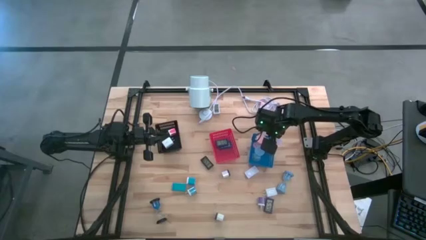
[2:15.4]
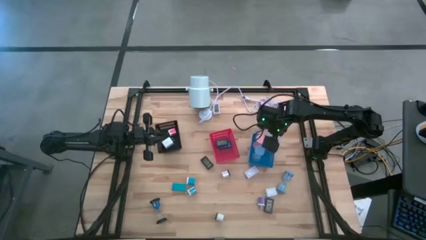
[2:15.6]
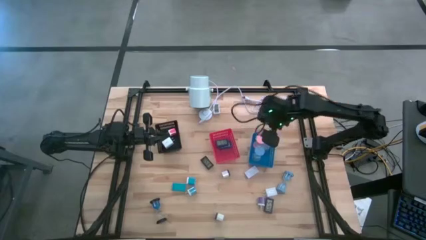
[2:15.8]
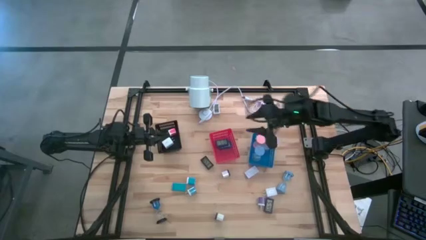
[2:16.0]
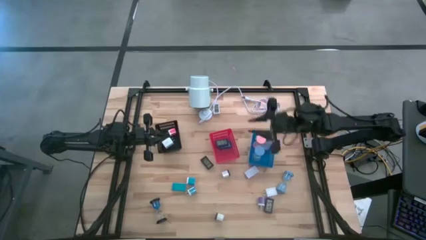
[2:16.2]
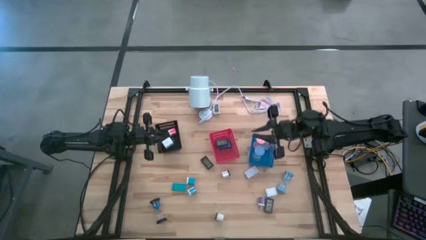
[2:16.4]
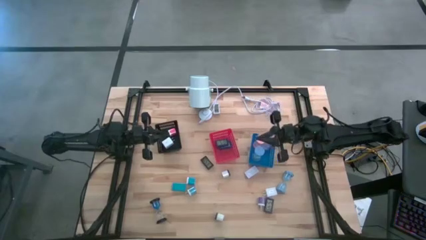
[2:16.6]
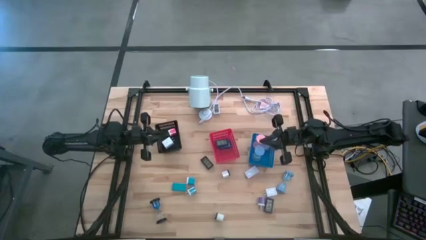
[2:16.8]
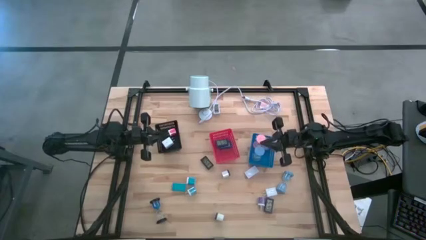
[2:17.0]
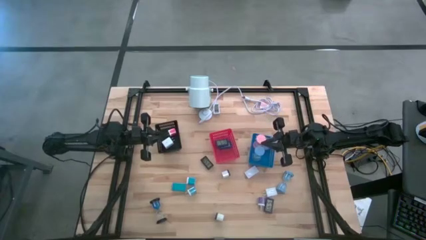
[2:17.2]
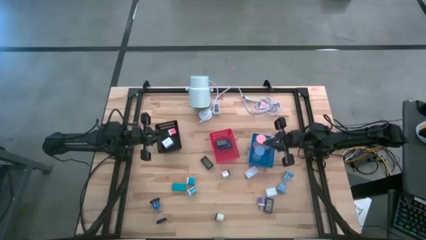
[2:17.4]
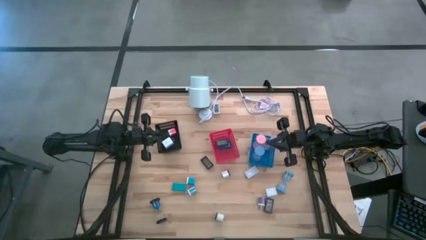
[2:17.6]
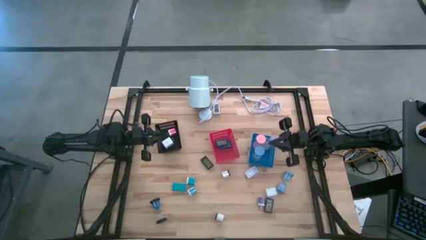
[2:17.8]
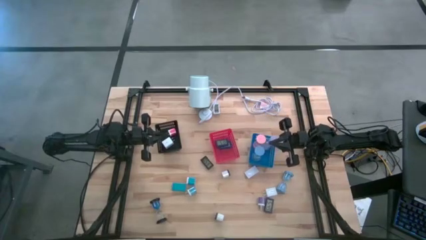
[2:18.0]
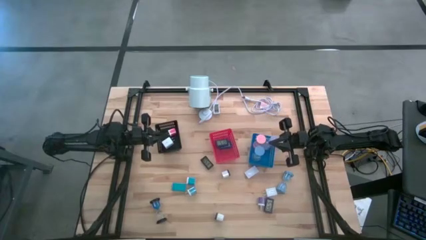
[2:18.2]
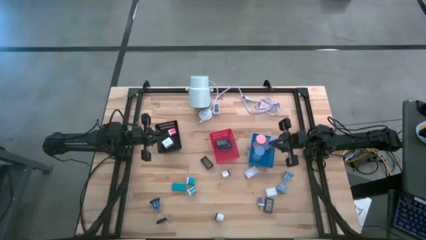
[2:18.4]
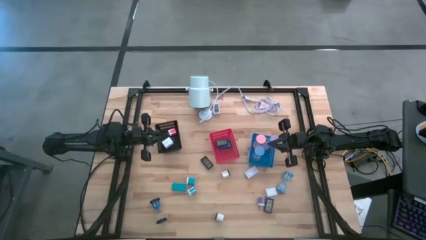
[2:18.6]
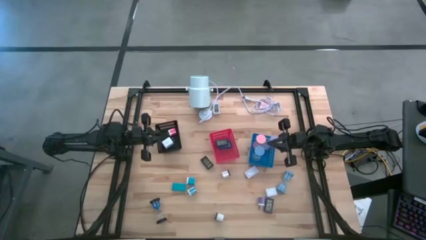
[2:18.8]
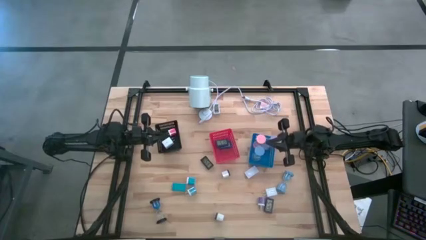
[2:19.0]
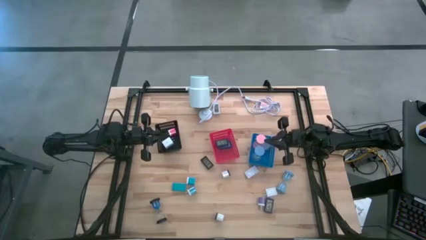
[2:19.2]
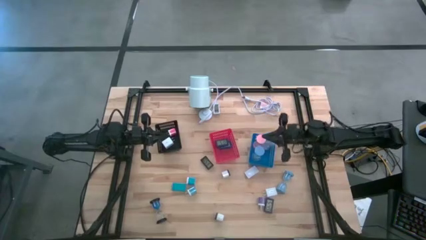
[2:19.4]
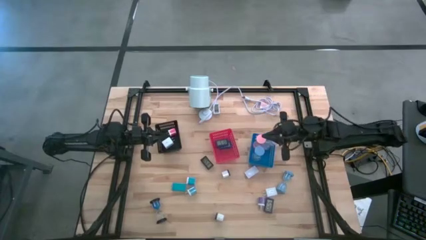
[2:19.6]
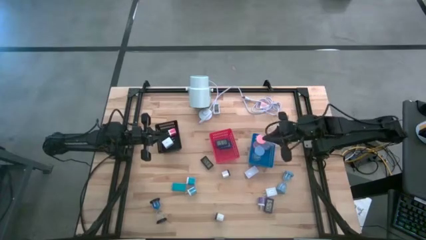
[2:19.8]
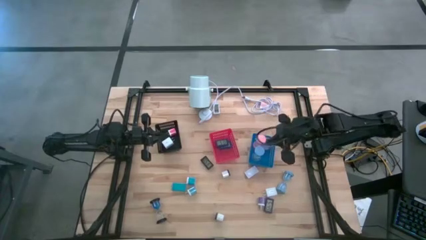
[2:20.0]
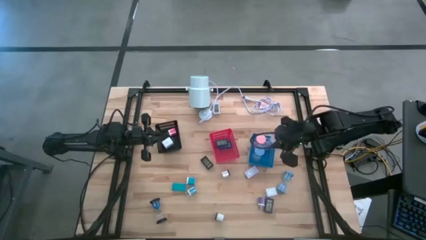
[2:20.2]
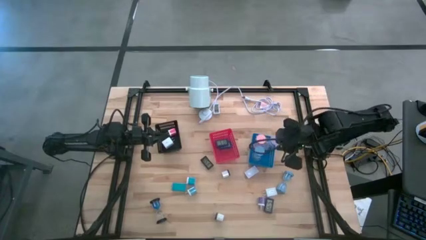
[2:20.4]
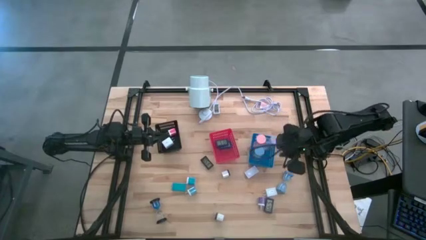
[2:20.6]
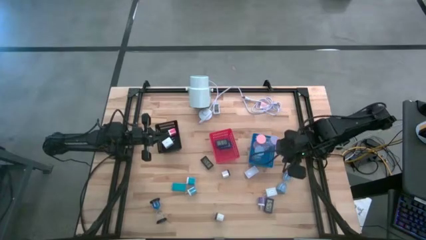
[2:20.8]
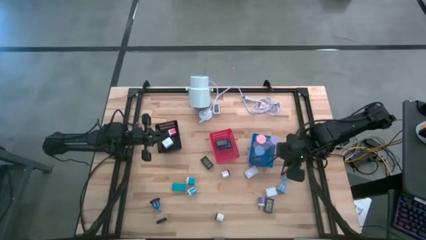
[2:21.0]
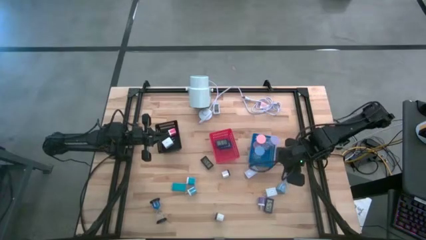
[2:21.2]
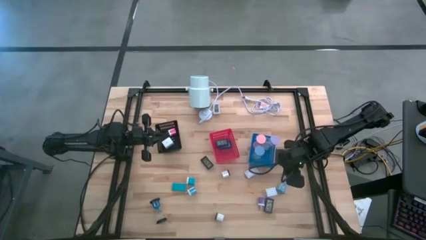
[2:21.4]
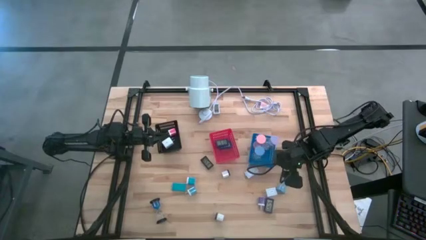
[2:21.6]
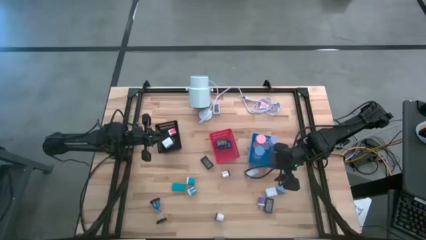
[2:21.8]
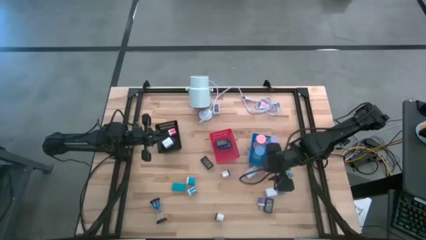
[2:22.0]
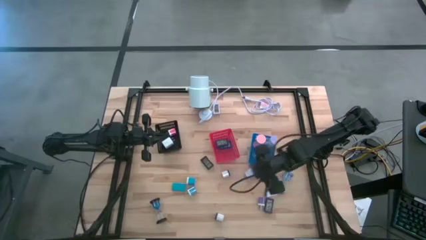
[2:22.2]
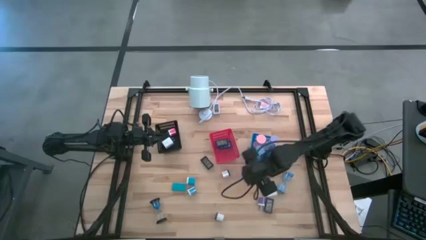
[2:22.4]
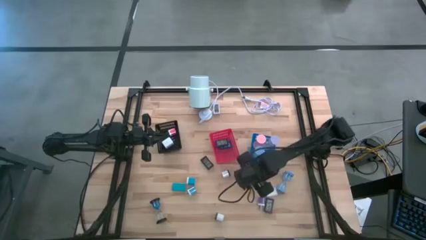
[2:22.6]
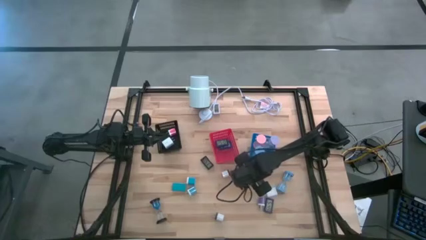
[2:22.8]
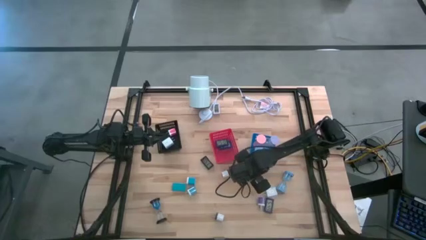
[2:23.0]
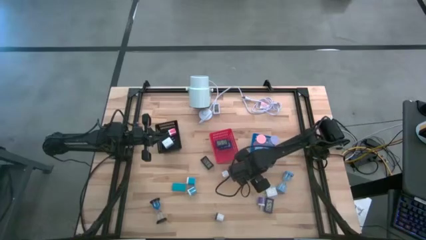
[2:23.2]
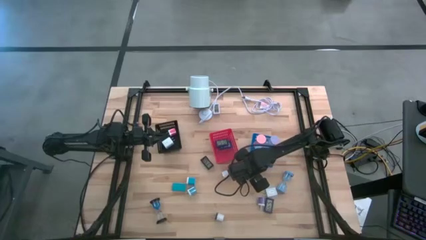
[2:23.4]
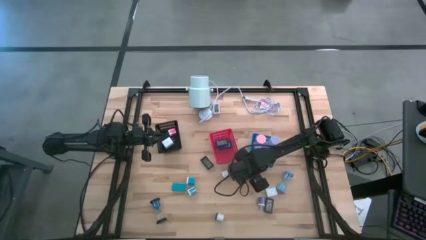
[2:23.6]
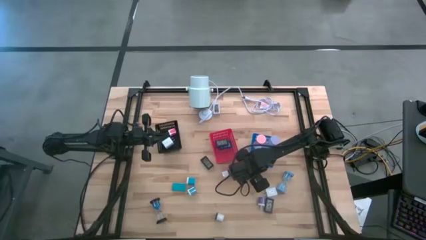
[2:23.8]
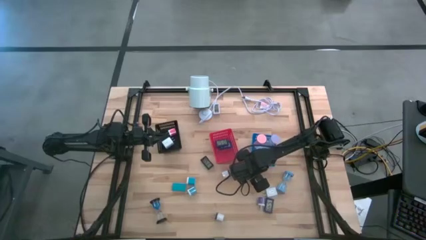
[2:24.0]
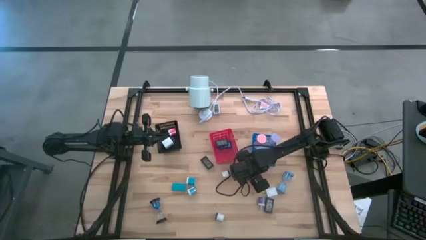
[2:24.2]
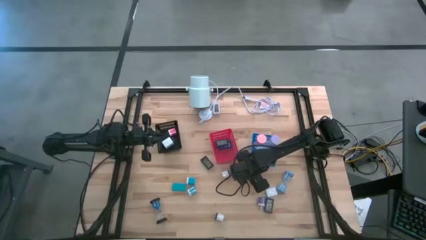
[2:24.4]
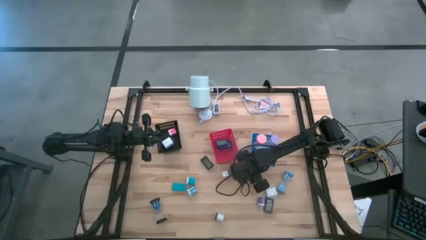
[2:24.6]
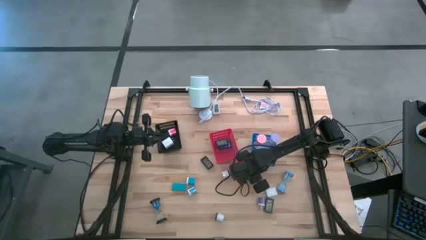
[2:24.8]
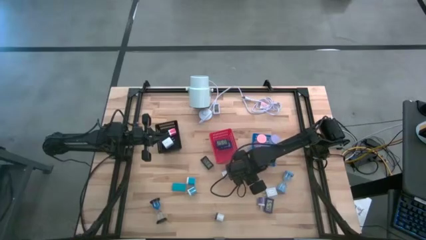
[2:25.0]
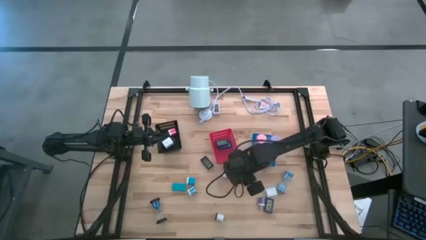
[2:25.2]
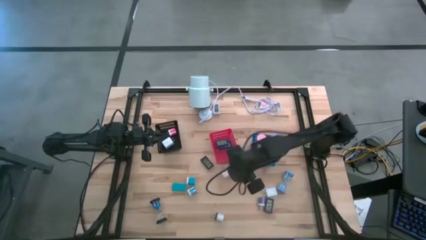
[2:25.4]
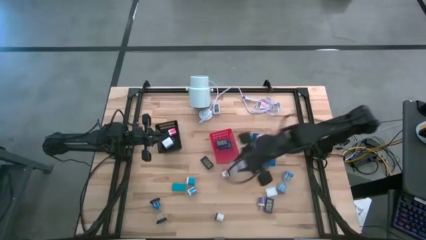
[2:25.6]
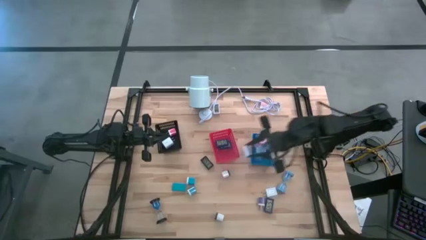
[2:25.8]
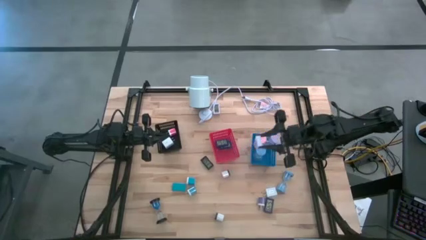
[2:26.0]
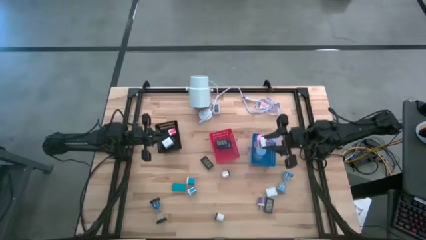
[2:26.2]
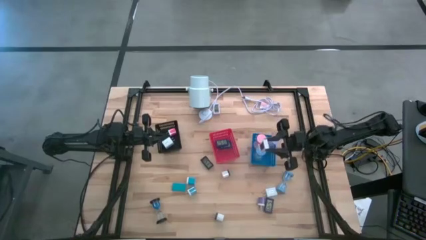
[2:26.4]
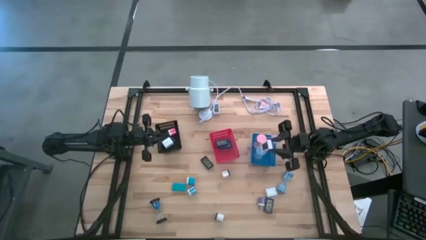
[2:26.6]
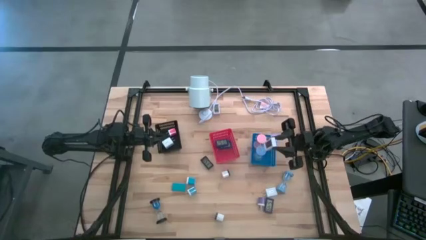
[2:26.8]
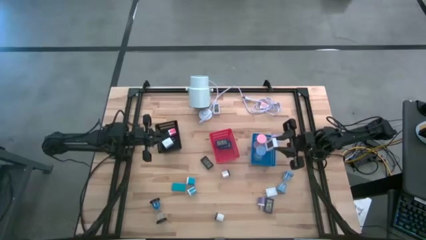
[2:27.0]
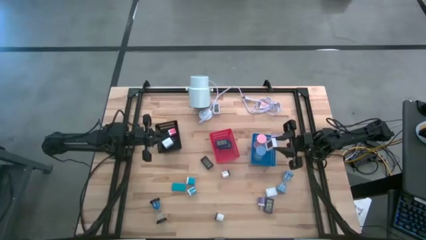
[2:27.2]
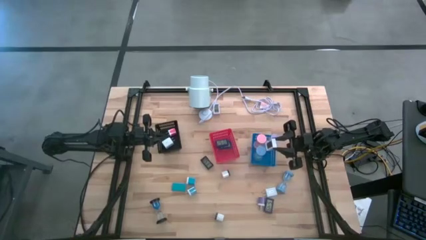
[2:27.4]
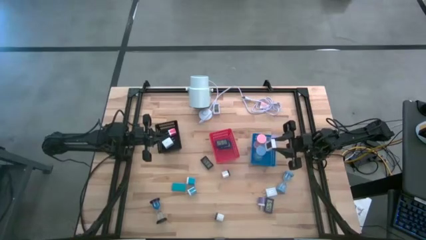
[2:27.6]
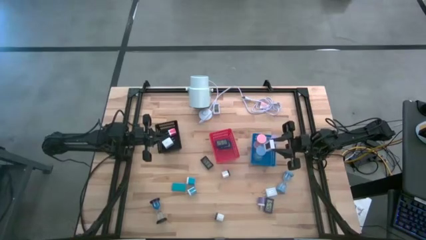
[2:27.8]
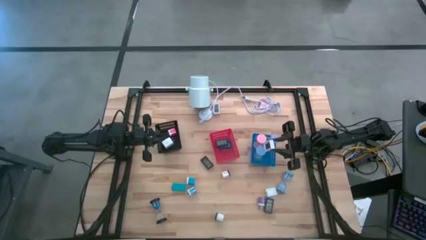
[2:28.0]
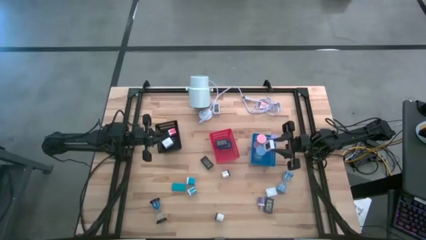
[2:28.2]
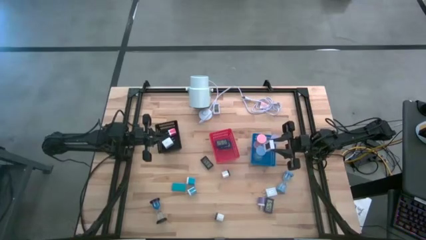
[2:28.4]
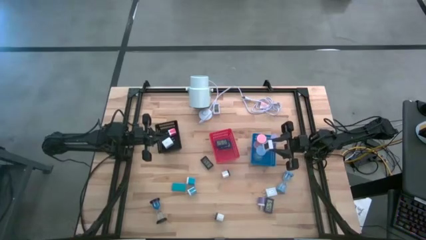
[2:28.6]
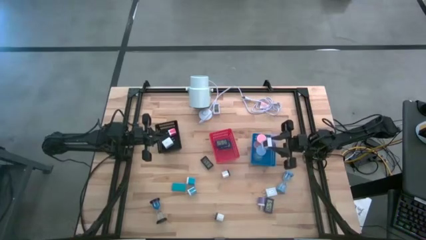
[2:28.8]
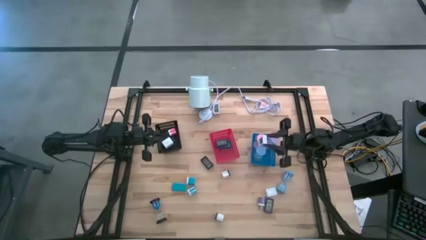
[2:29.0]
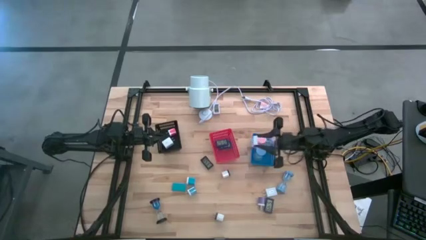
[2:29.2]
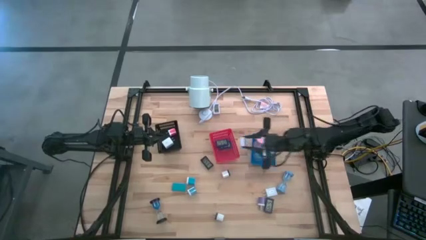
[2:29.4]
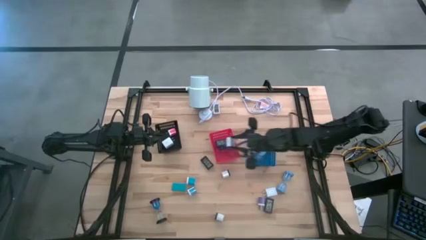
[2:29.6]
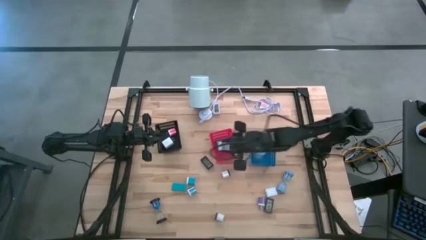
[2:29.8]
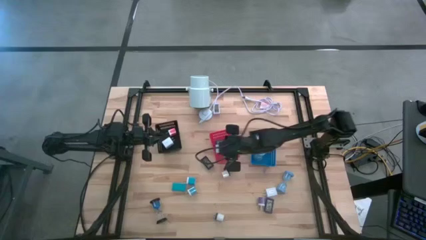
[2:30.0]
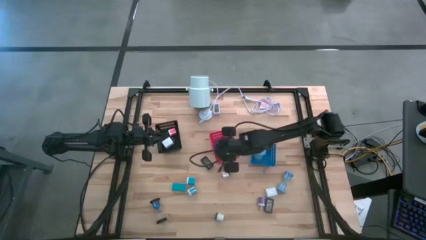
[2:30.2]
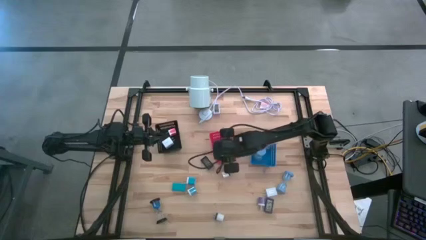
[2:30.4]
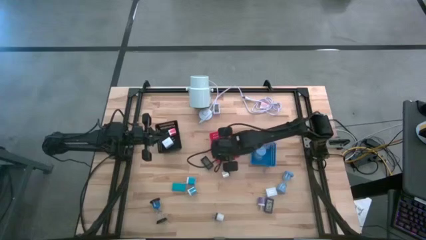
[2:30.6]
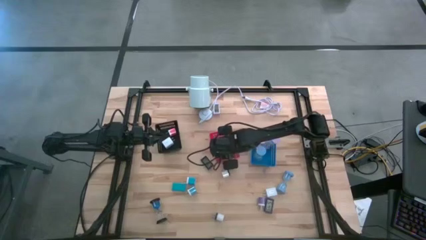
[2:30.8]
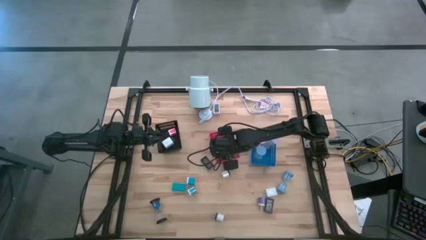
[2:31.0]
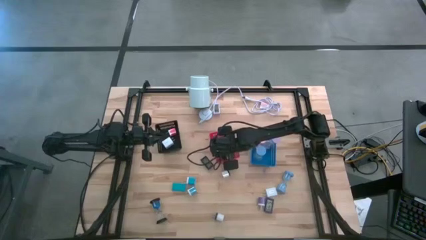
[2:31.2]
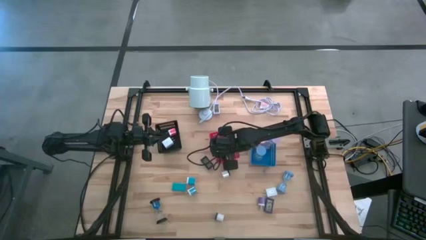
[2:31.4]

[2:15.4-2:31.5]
Task: Pick & Place Office items
Put the bottom white digital clock into the red bin

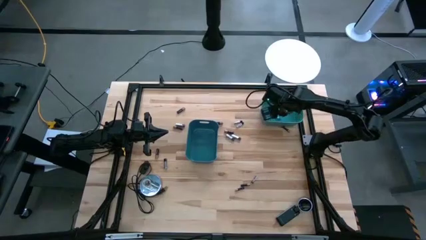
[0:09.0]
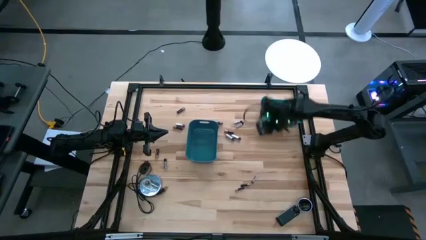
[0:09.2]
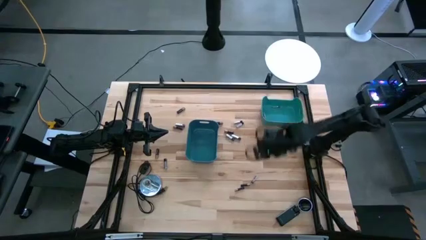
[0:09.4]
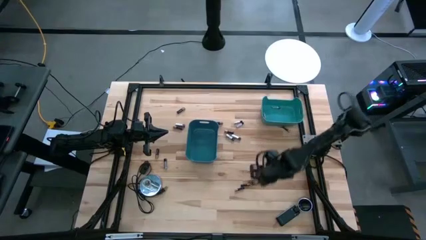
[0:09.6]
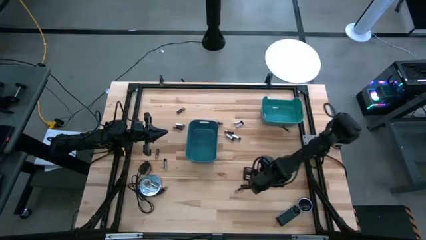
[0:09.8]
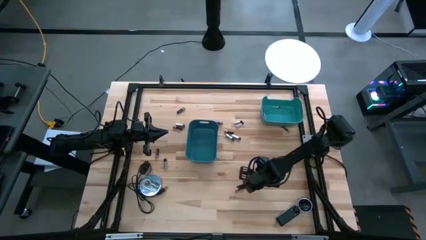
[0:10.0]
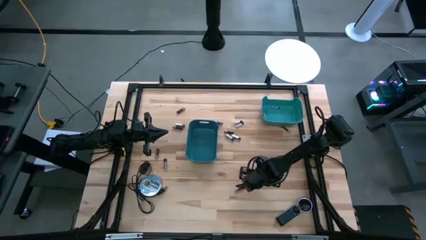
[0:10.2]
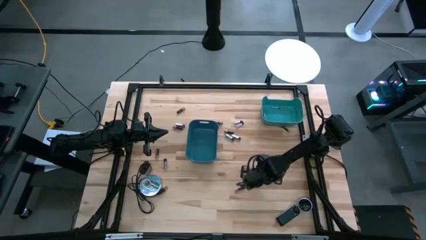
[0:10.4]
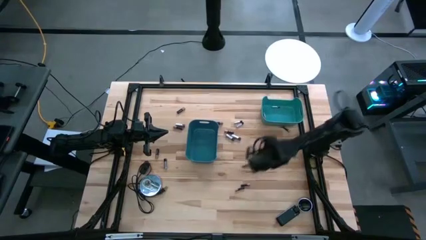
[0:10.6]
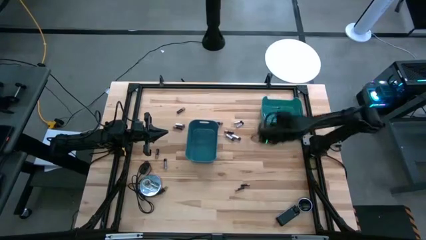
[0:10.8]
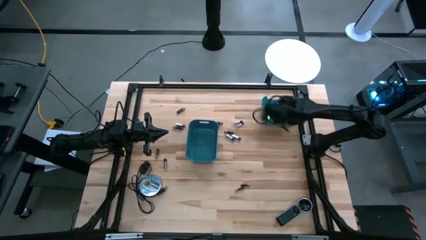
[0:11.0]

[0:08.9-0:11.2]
Task: Sort batteries
Put the silver battery into the green bin
